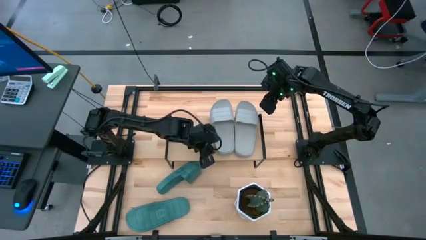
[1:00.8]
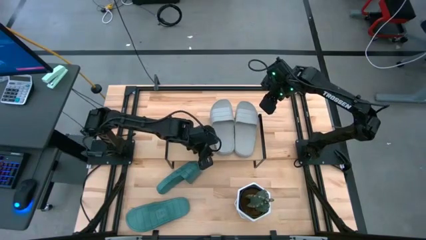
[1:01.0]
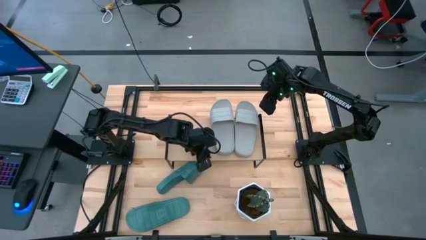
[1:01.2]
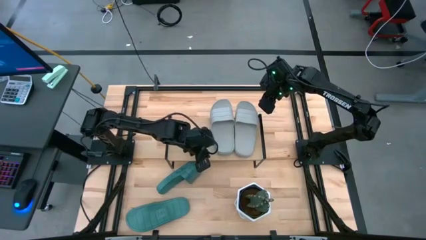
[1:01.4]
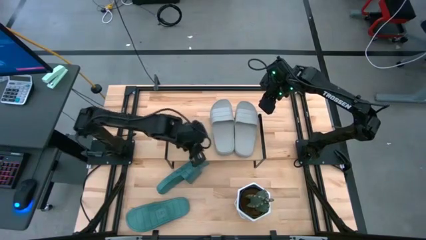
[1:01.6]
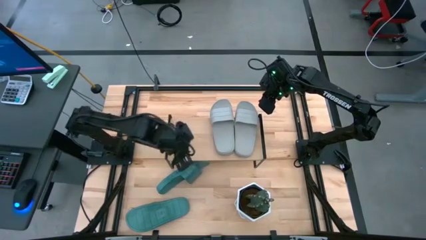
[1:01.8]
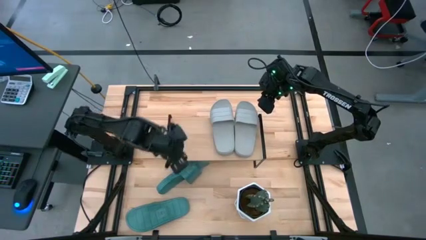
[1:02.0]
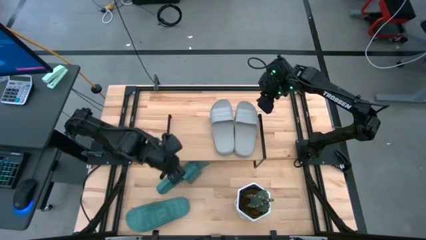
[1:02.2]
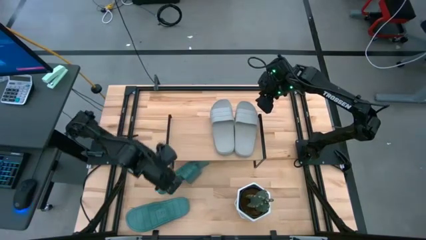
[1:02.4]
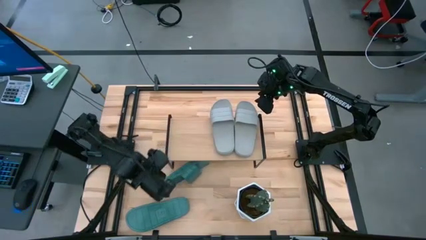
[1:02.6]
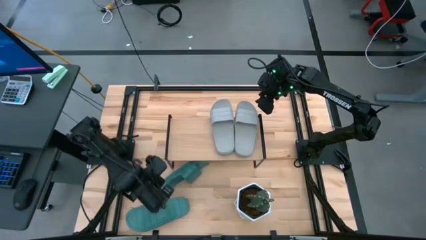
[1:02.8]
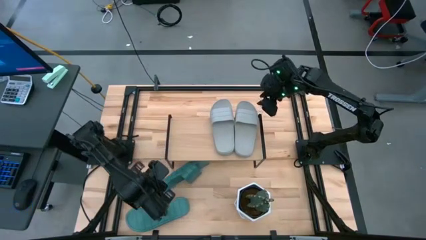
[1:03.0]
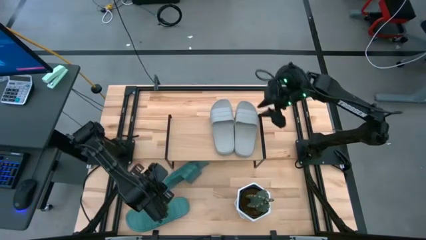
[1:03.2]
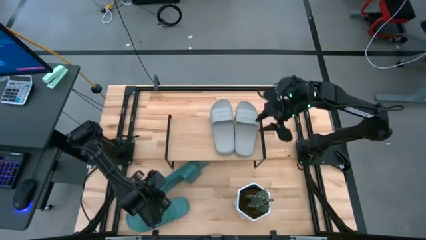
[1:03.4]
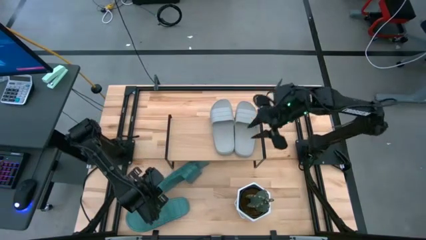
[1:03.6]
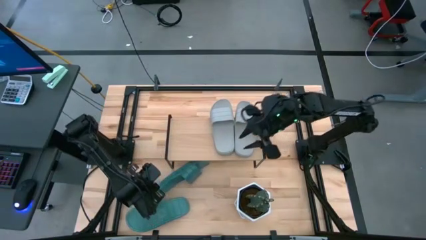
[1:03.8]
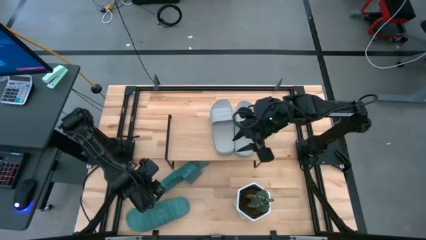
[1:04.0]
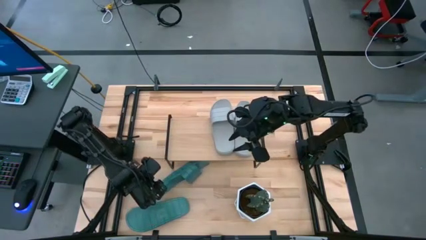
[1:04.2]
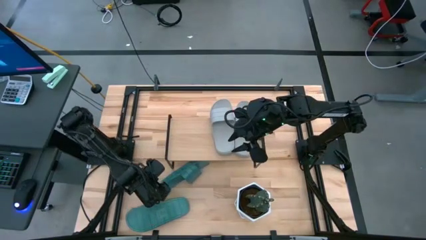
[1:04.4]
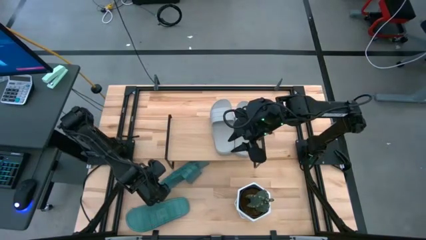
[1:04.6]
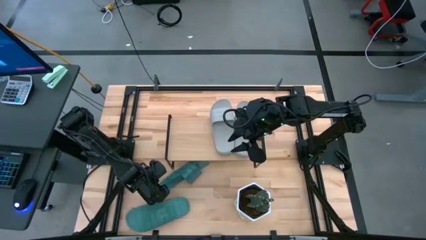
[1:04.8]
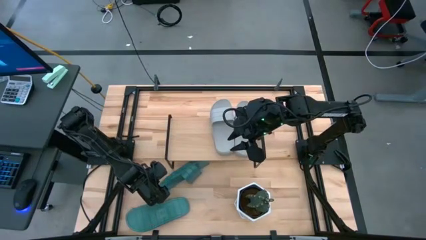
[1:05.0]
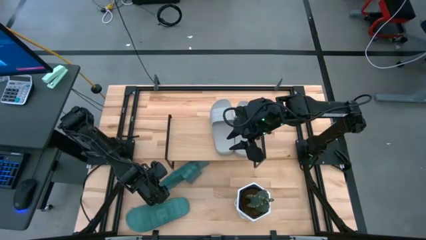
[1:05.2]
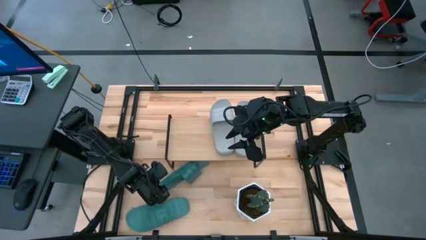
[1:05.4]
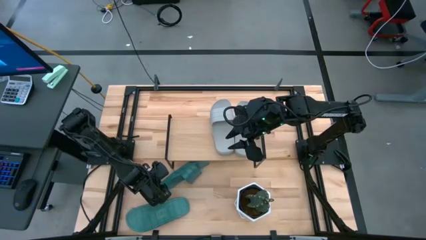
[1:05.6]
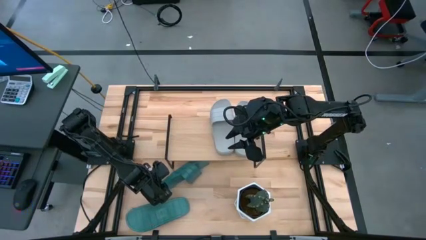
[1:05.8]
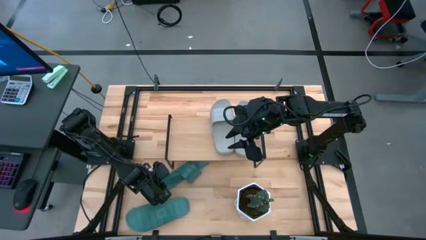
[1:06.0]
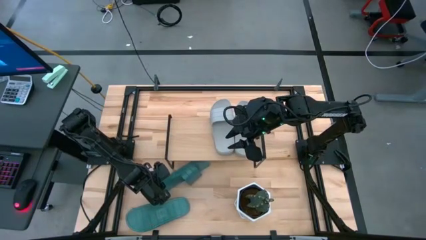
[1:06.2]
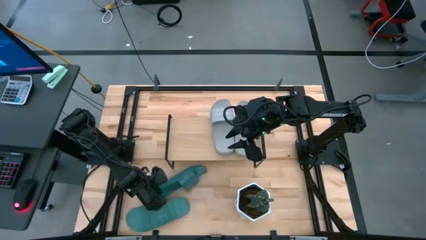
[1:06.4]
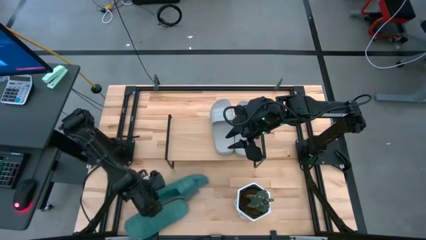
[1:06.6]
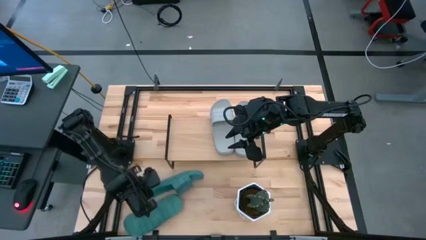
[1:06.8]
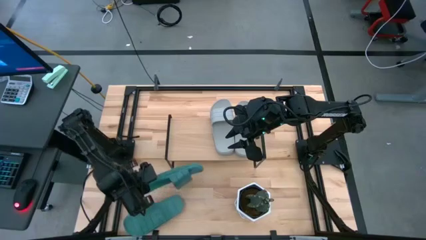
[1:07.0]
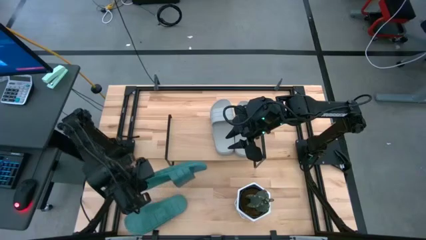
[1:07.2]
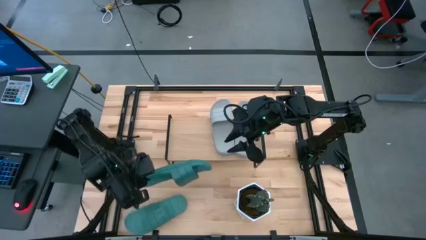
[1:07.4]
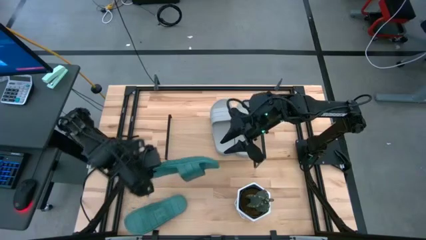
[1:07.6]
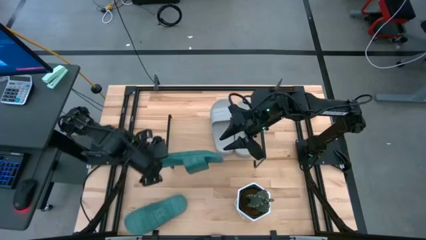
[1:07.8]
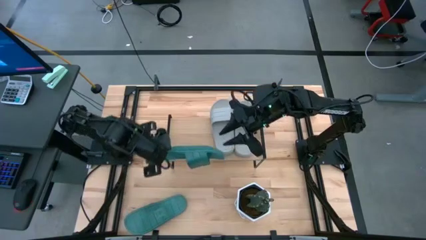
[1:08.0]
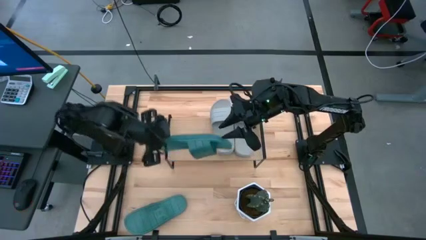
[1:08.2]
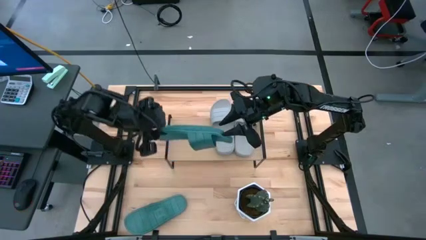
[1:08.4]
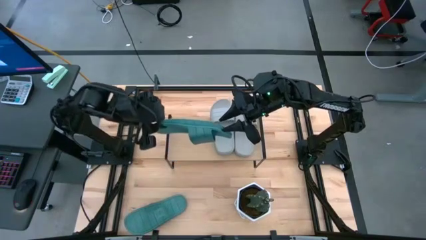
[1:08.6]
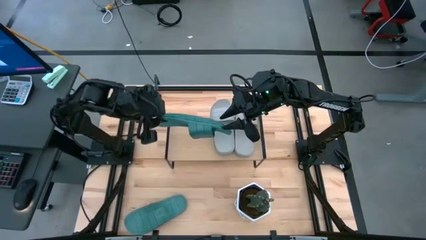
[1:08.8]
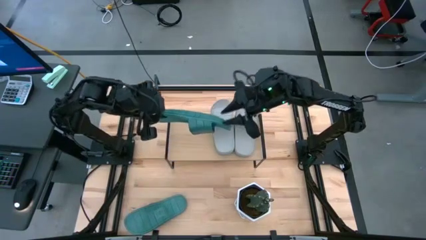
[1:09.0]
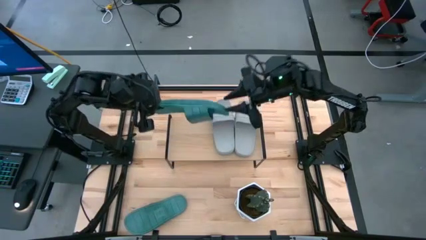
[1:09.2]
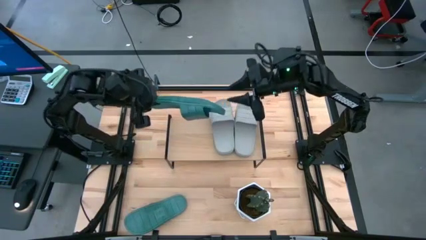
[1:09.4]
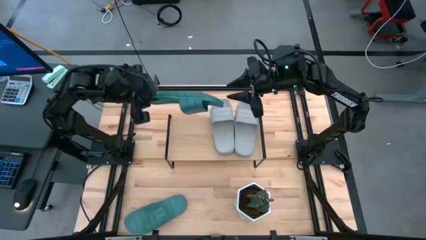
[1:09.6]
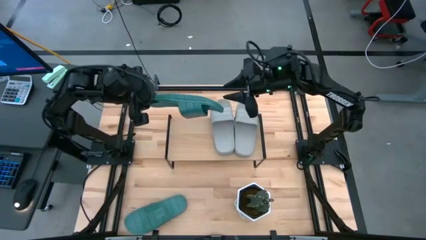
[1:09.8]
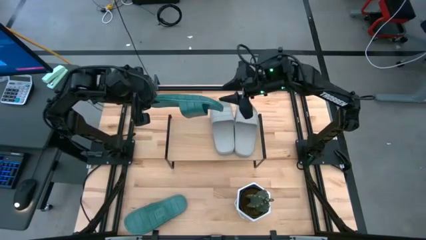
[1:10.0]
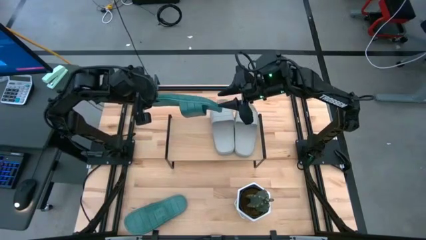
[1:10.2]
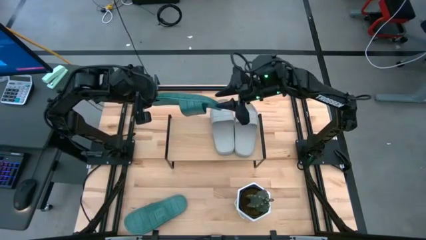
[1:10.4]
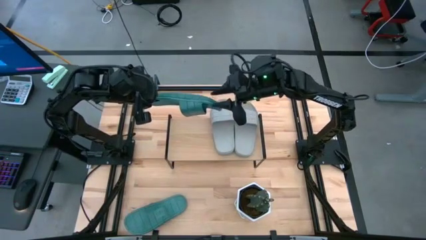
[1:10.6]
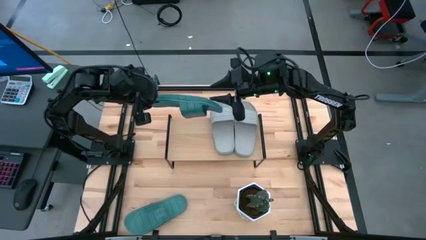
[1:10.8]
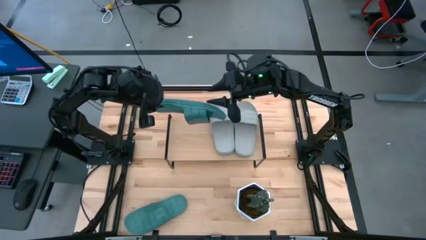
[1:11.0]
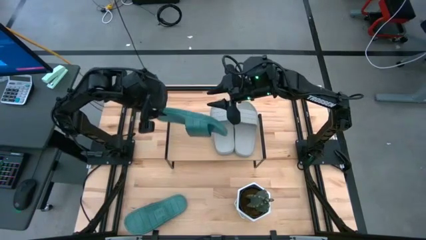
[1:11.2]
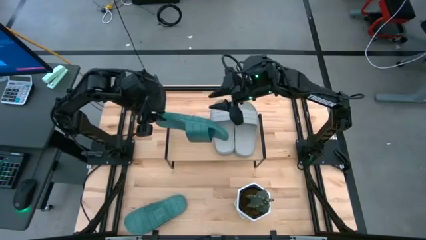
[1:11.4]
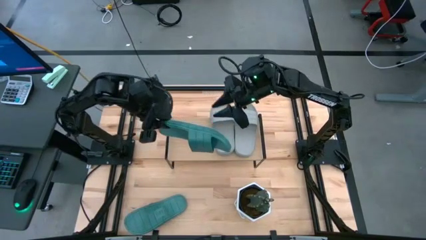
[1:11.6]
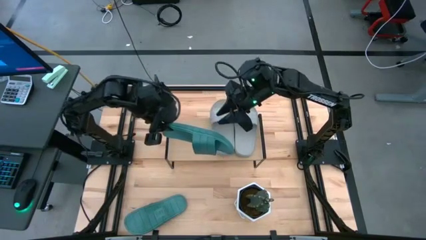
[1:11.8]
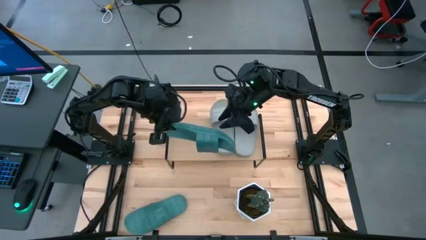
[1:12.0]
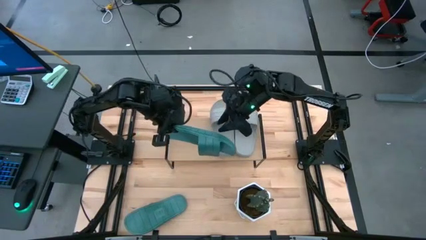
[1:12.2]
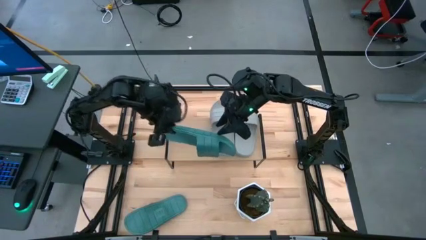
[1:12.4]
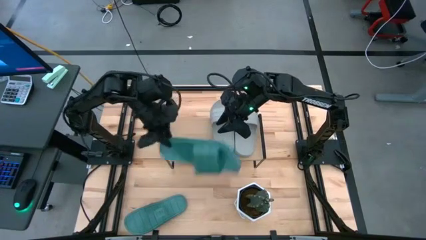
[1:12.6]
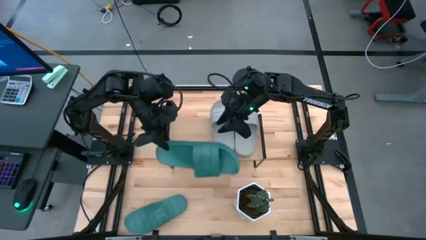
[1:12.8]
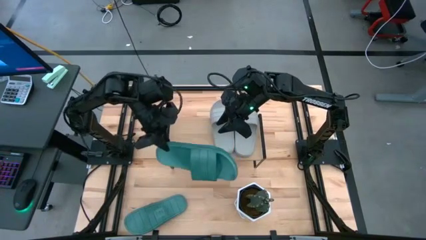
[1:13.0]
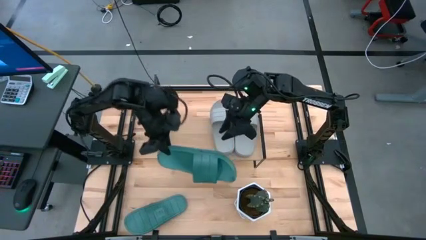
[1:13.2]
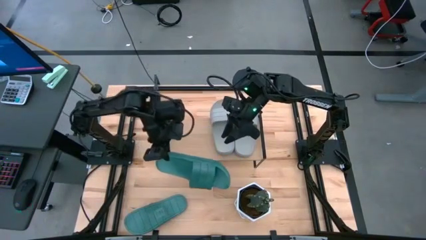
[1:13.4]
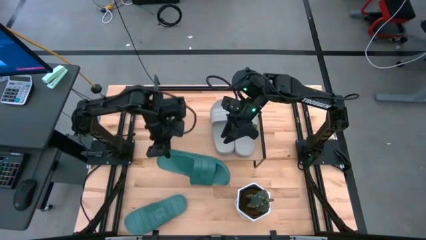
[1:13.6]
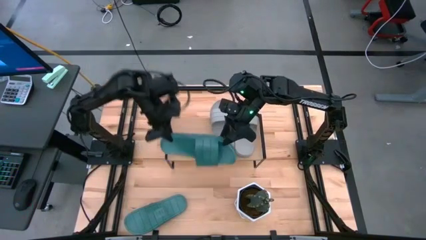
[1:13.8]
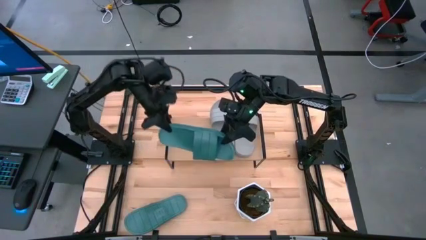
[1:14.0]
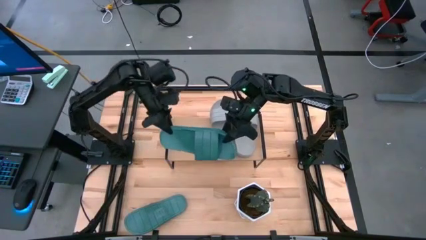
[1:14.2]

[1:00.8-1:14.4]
Task: Pick and place slides into the shelf
Put the top green slide on the shelf
